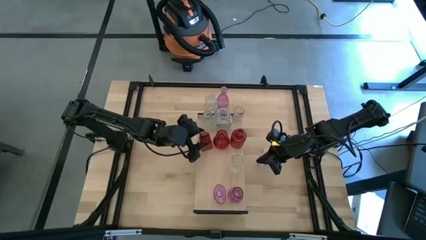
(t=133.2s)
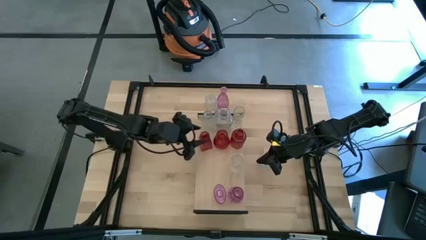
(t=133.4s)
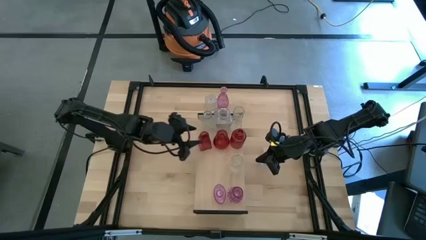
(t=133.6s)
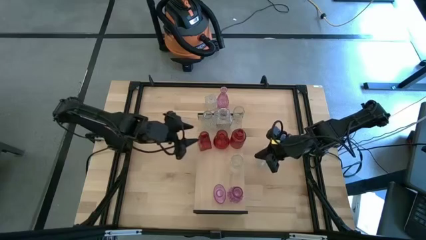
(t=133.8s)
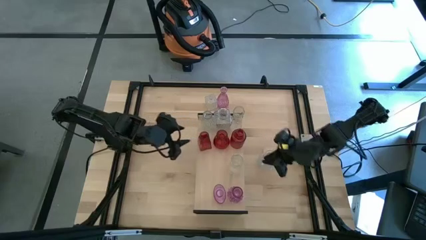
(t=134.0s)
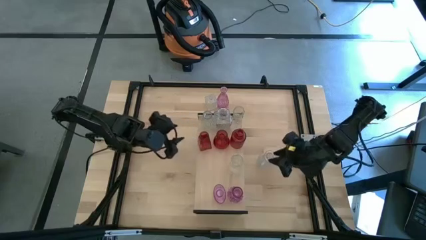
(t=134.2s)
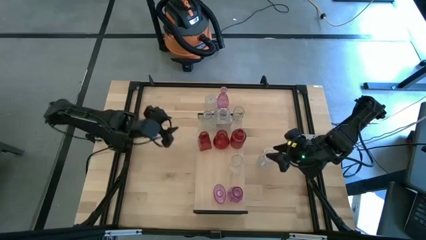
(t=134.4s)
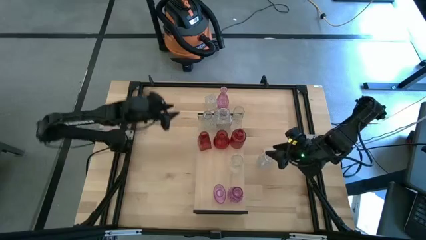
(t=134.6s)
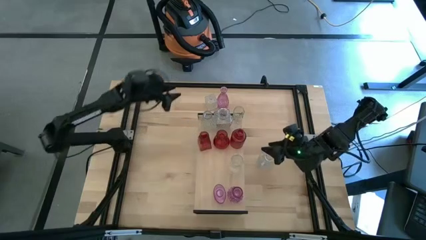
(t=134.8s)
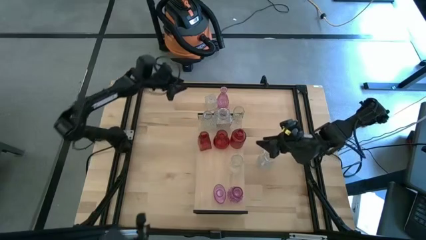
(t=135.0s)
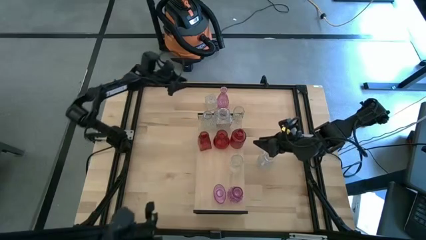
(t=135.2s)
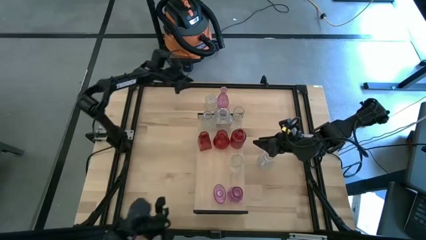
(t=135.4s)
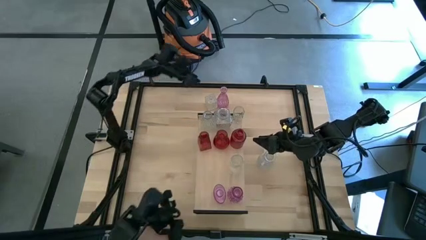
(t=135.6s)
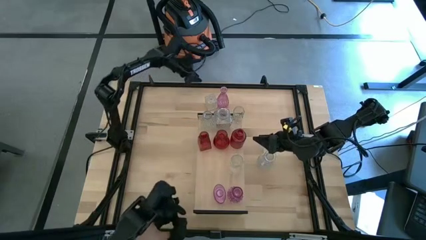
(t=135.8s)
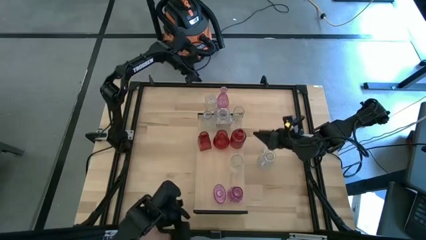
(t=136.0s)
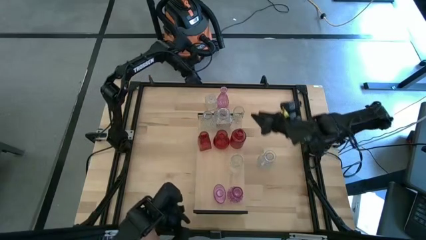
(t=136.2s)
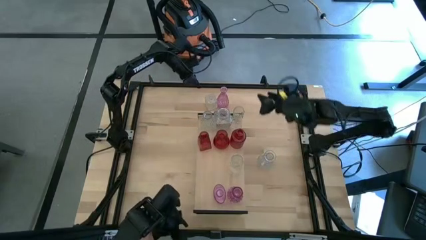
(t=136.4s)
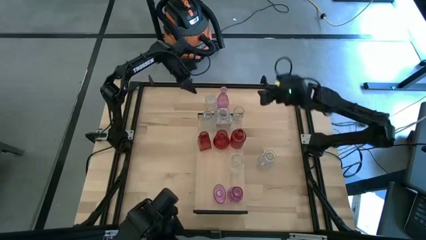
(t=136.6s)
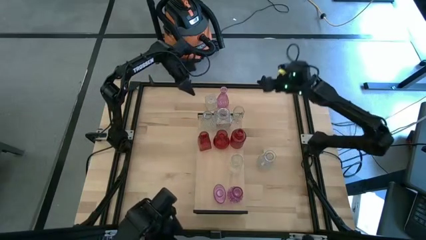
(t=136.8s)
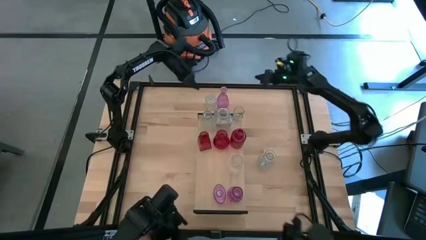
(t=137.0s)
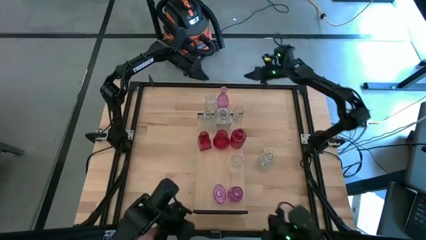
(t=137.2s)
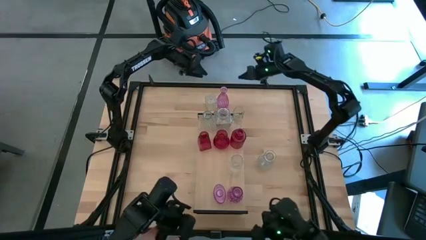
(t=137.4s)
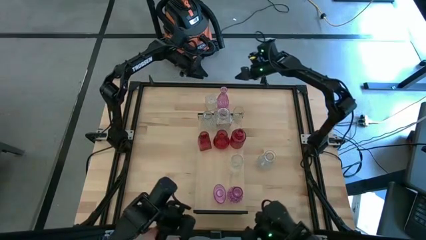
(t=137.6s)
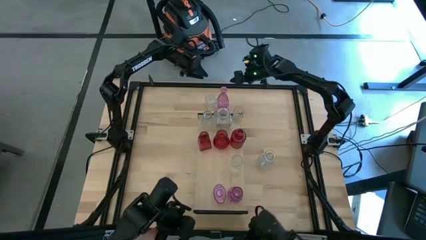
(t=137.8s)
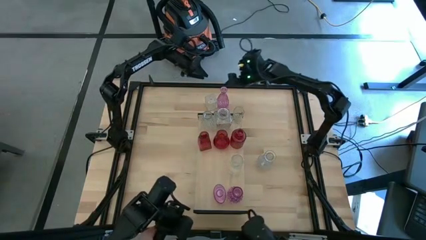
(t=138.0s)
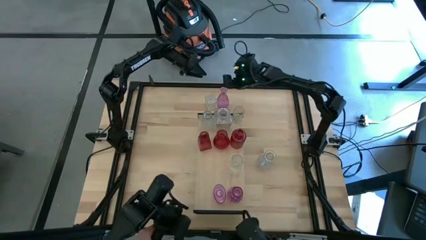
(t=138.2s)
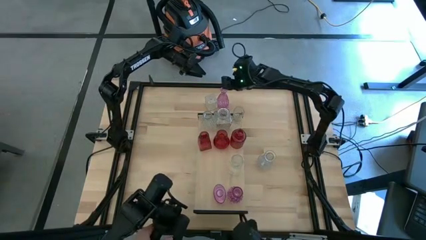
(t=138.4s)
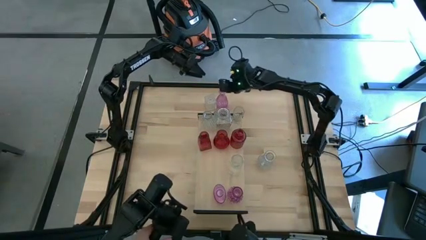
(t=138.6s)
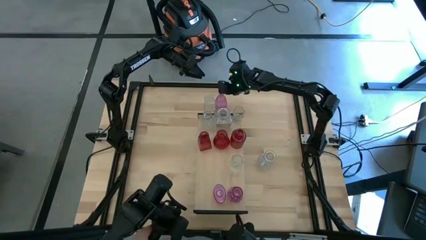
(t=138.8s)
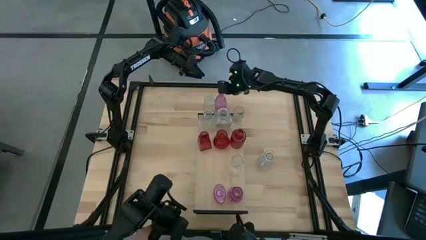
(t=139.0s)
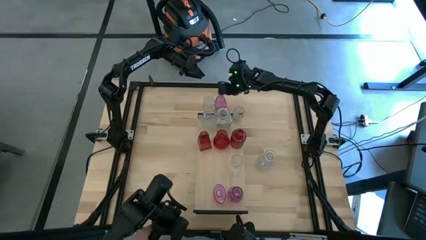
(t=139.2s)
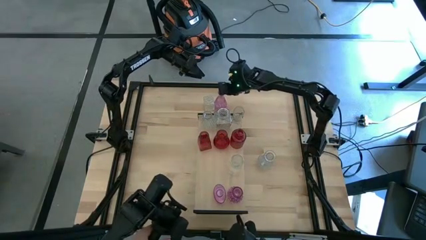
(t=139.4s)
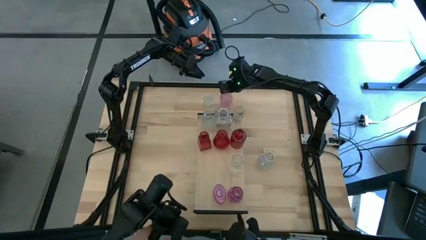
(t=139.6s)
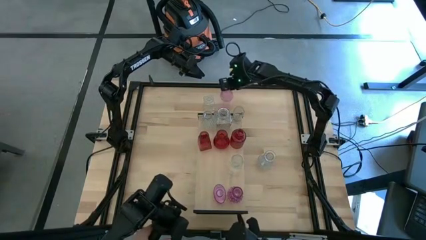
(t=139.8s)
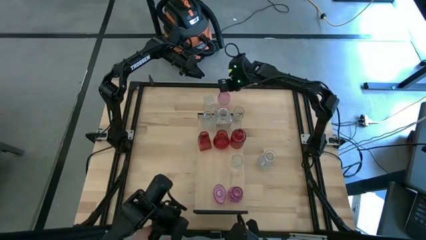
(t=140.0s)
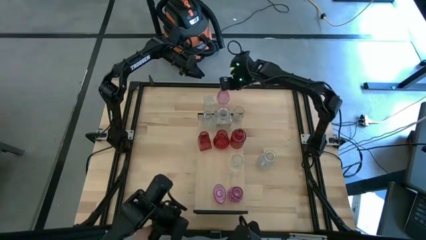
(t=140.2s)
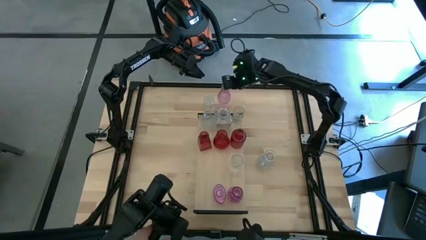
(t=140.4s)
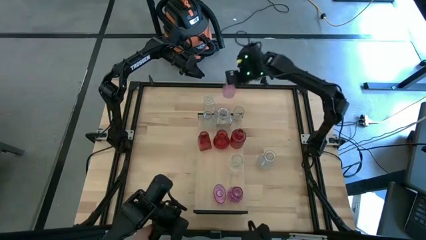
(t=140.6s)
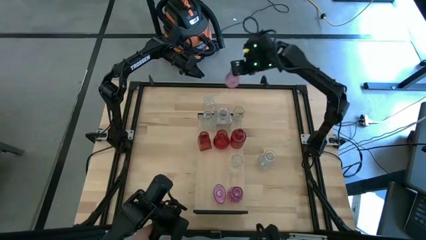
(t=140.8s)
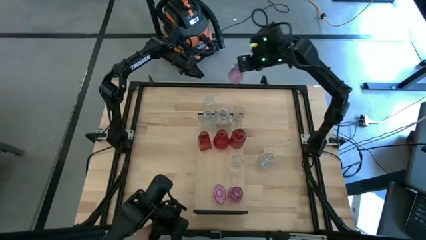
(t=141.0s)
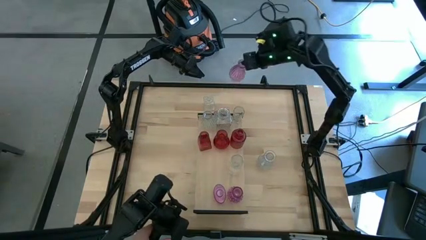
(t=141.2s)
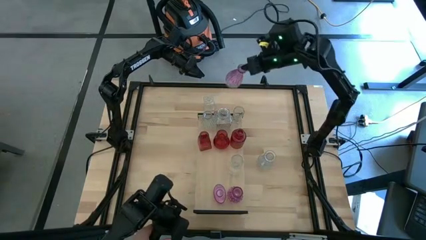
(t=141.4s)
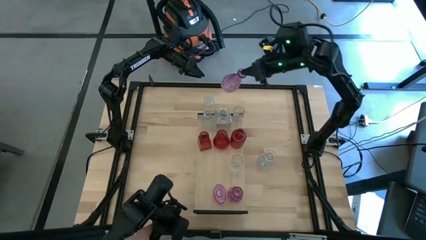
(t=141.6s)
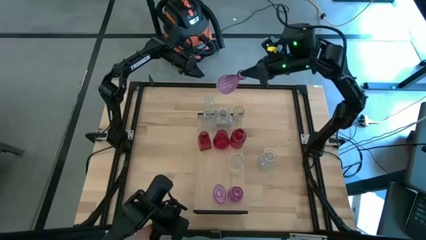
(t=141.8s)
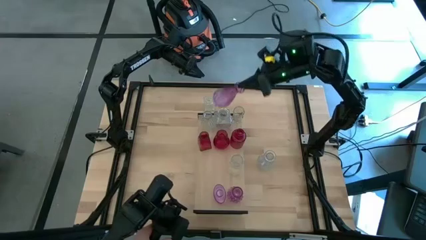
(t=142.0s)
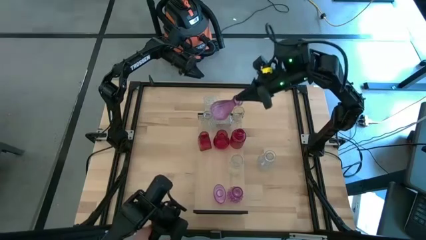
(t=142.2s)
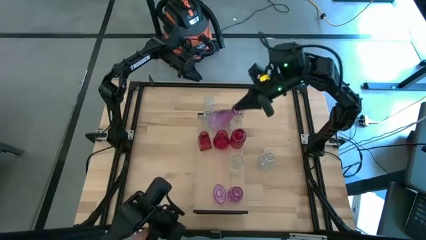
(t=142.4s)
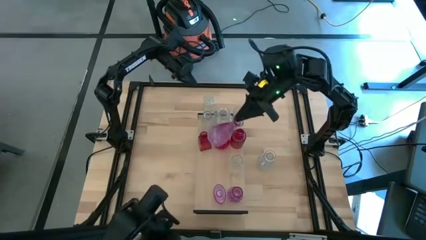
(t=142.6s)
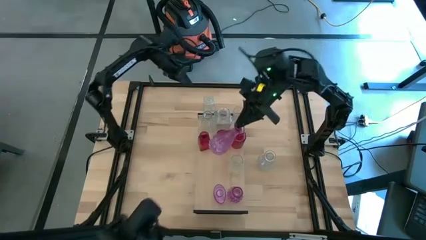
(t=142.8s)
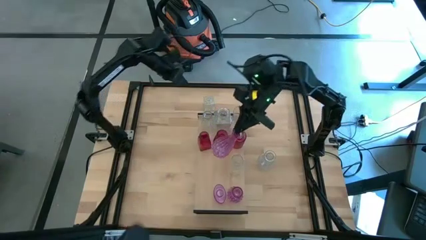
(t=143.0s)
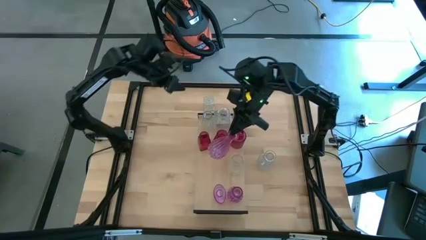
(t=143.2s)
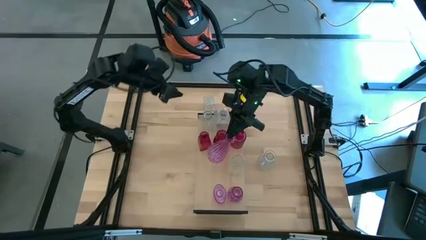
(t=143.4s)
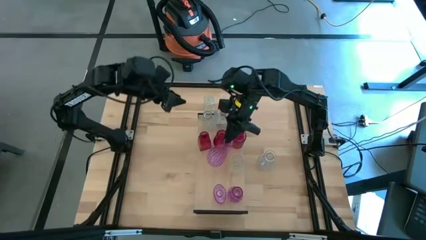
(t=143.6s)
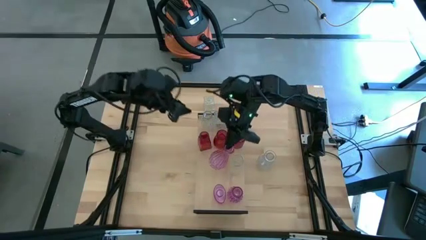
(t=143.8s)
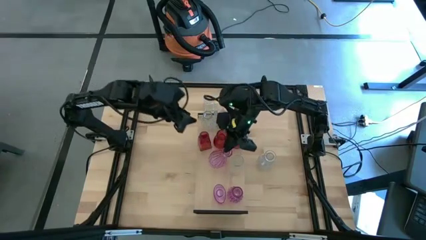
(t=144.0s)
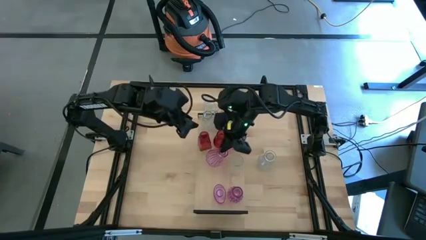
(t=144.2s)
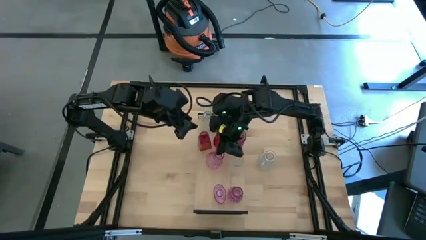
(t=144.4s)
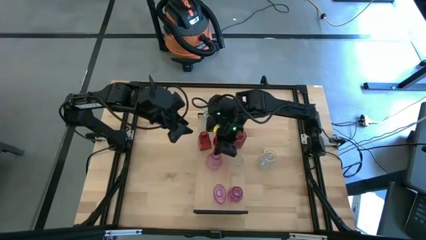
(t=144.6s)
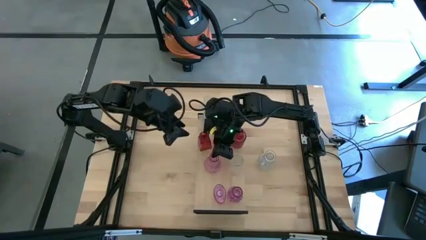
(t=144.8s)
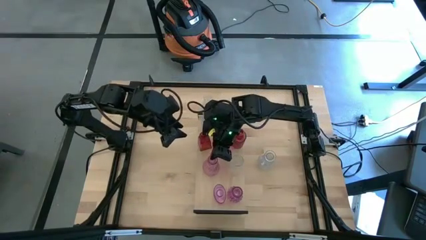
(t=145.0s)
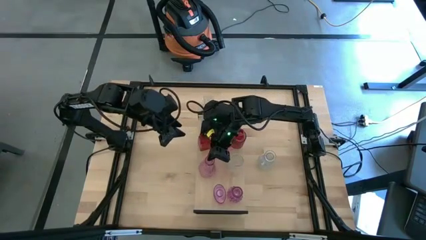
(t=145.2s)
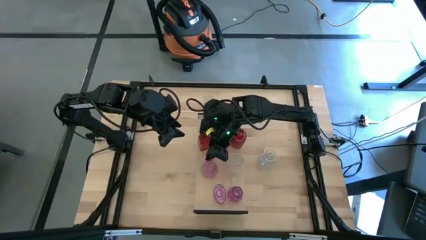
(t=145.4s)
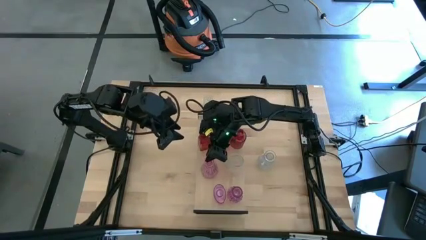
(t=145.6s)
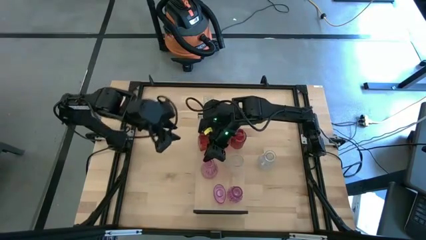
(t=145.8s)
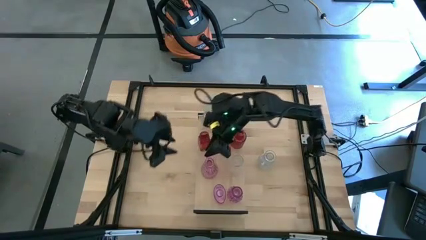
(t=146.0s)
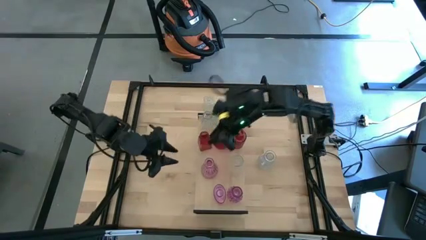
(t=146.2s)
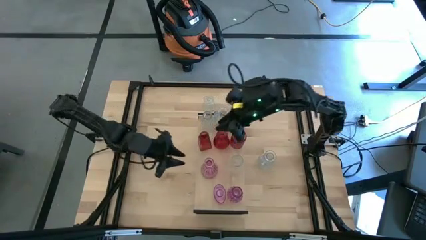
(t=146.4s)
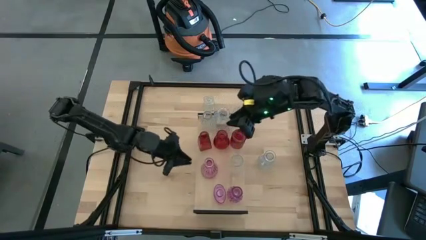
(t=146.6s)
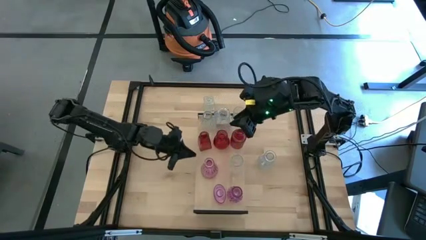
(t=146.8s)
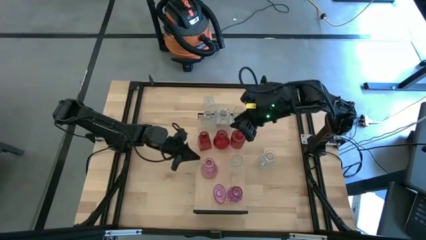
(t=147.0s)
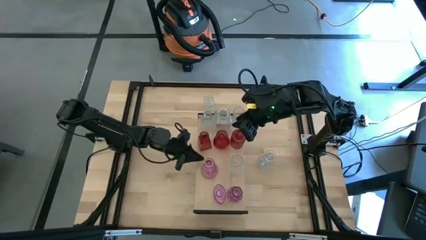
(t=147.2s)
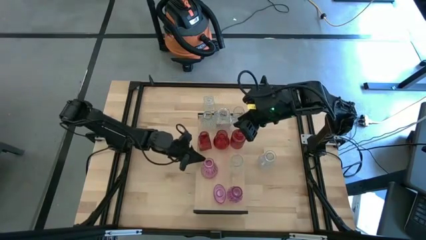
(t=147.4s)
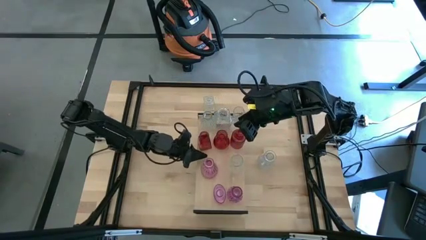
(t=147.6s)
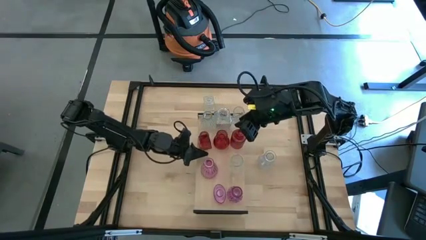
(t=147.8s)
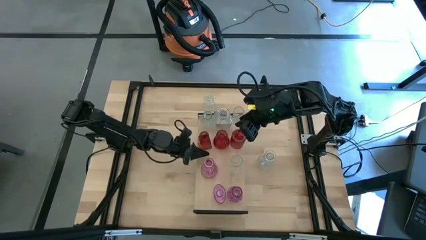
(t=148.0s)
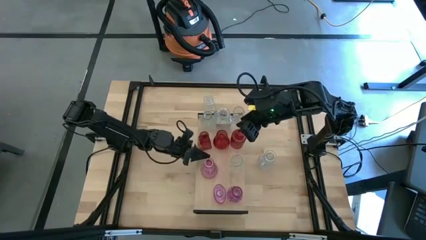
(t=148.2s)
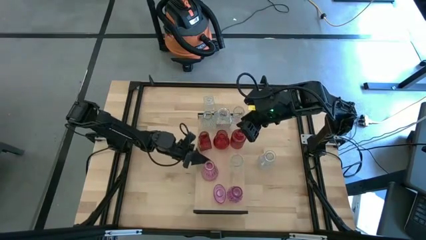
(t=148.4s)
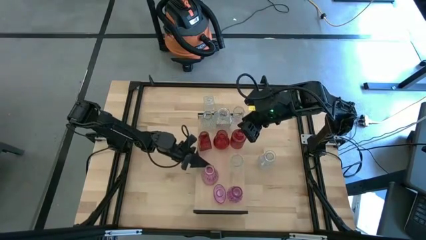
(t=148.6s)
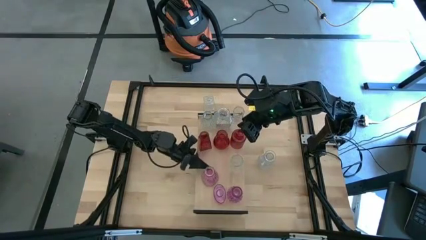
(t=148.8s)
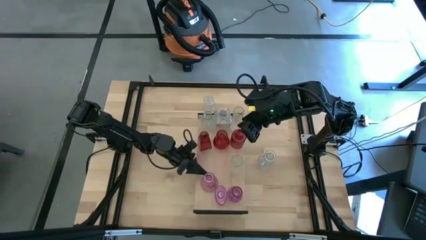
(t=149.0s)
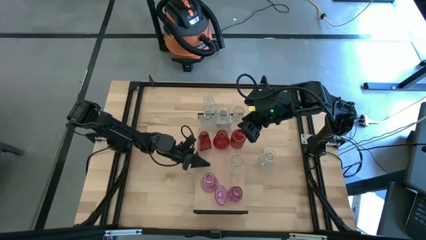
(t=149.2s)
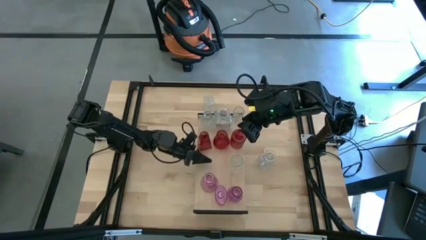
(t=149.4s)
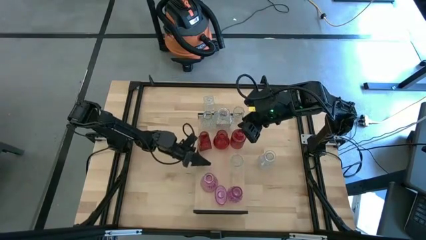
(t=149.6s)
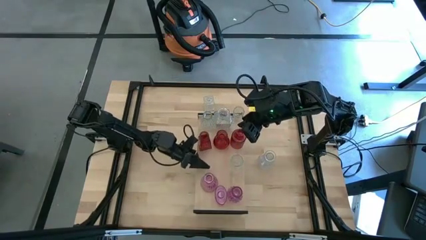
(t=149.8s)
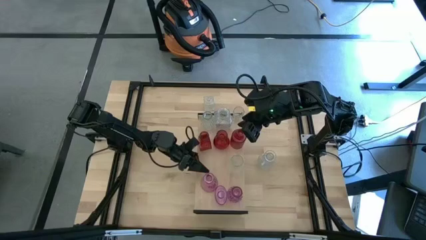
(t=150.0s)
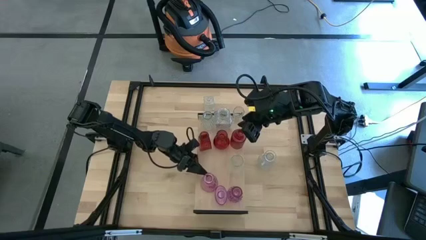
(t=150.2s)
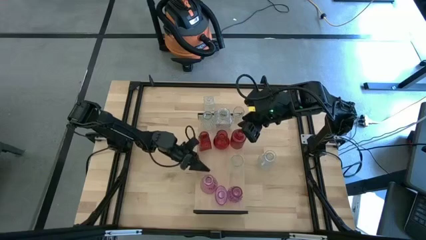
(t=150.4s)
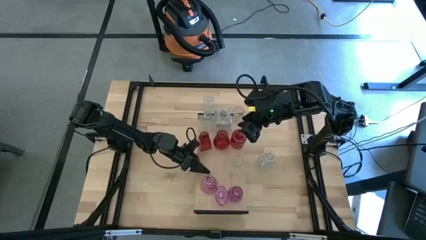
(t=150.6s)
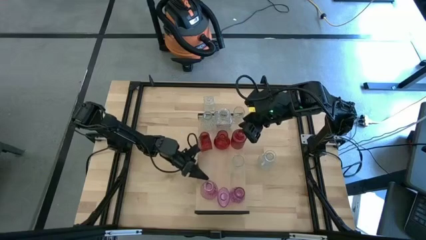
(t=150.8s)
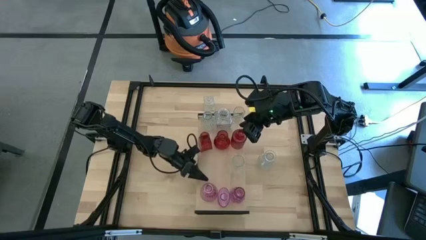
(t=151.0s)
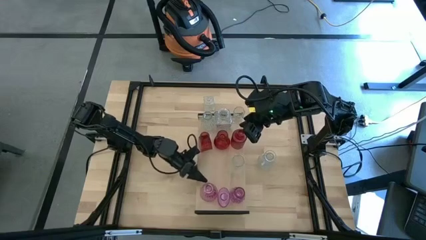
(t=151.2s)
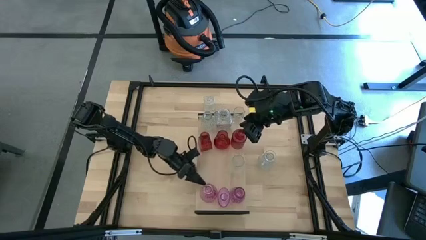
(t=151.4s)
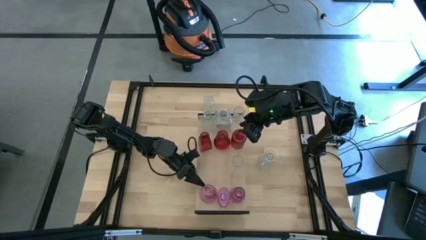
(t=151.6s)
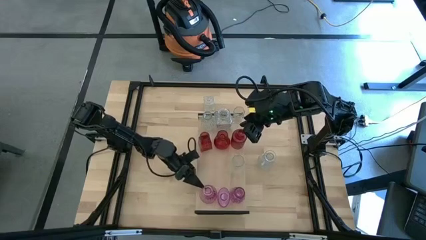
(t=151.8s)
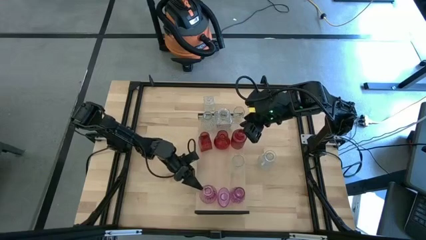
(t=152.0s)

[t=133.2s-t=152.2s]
Task: sort vases onto shelf
Put the violet vase on the shelf aligned with the violet vase
